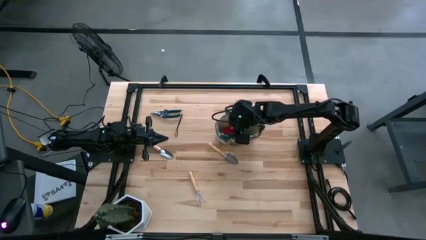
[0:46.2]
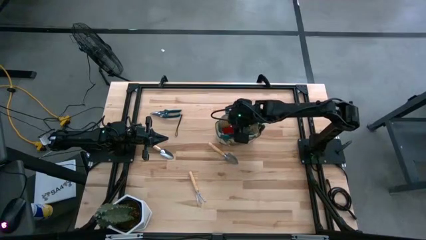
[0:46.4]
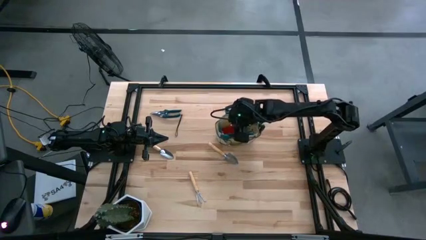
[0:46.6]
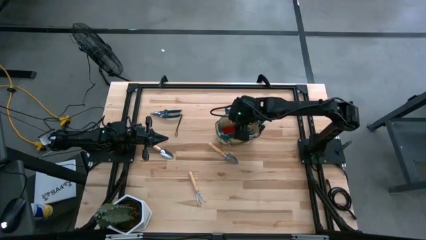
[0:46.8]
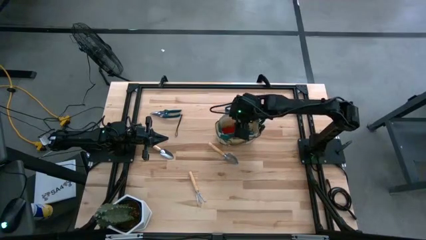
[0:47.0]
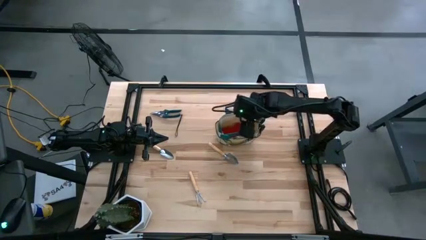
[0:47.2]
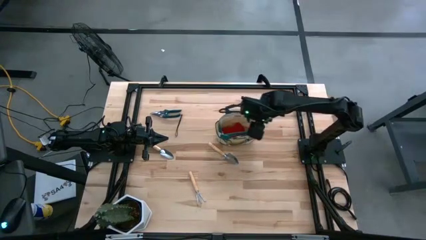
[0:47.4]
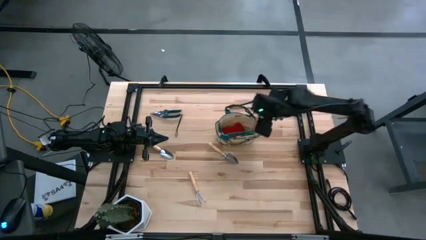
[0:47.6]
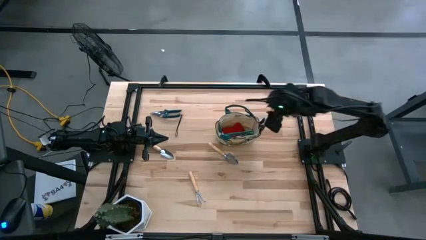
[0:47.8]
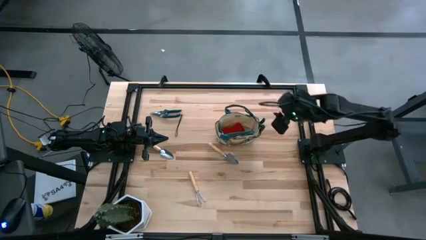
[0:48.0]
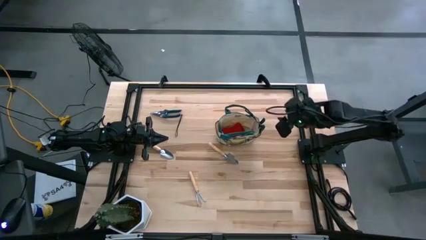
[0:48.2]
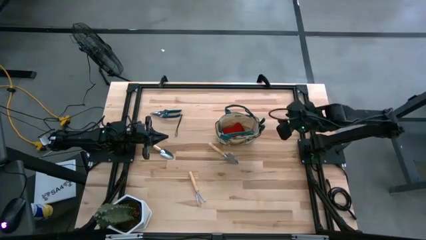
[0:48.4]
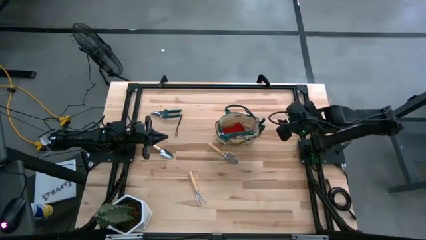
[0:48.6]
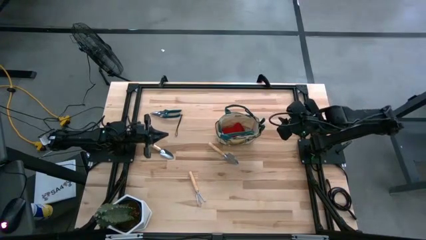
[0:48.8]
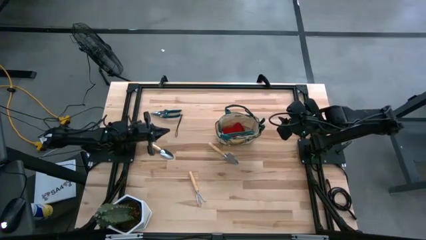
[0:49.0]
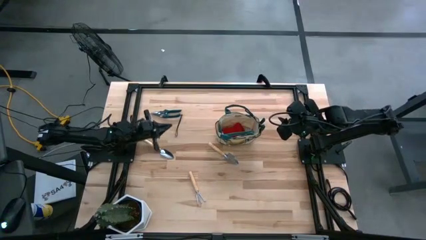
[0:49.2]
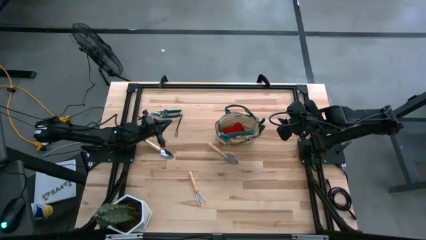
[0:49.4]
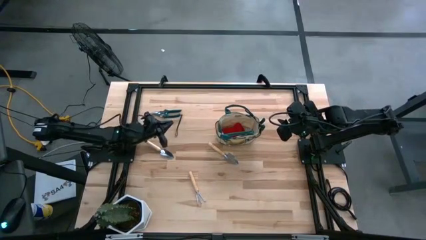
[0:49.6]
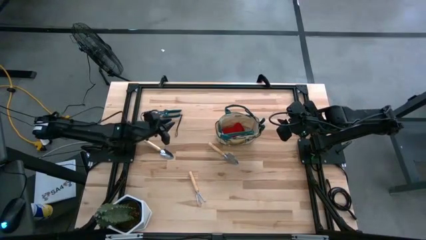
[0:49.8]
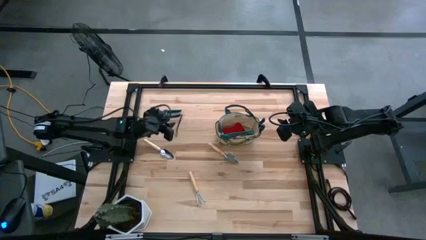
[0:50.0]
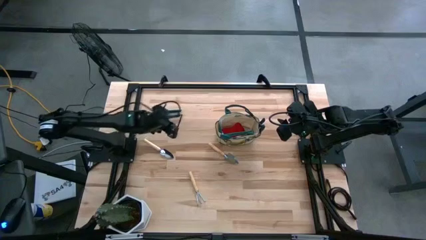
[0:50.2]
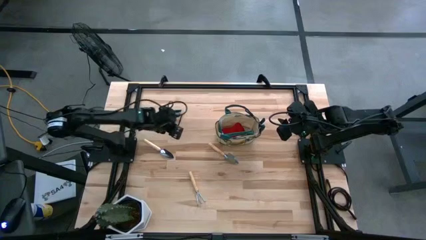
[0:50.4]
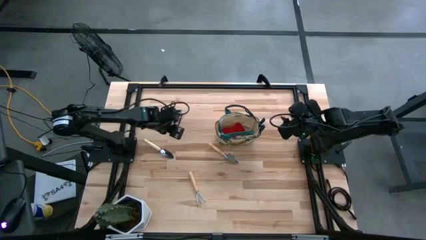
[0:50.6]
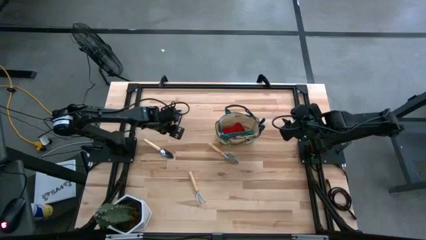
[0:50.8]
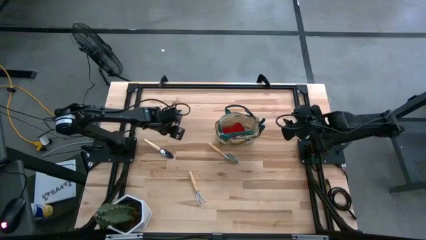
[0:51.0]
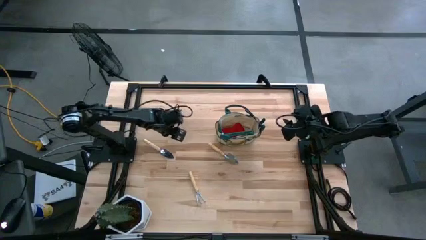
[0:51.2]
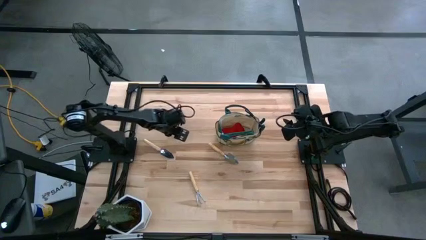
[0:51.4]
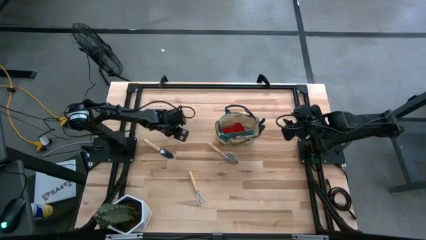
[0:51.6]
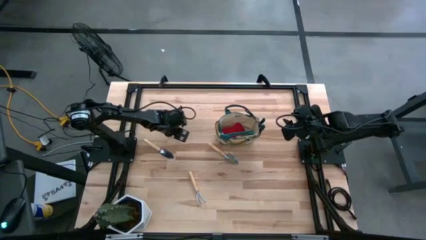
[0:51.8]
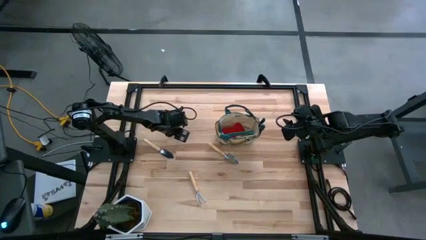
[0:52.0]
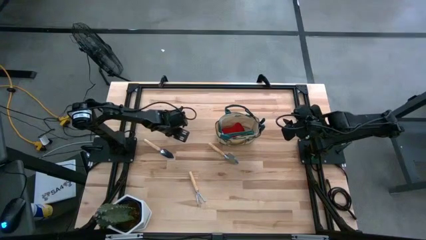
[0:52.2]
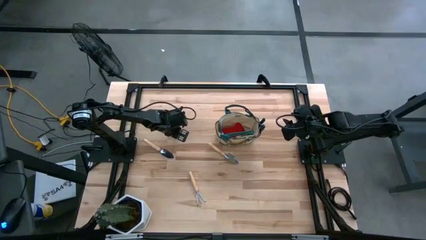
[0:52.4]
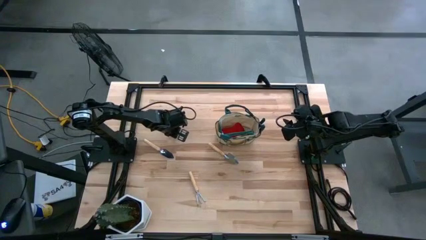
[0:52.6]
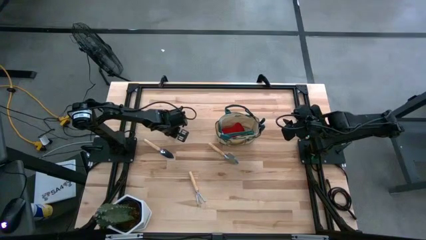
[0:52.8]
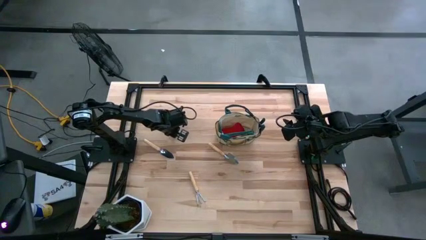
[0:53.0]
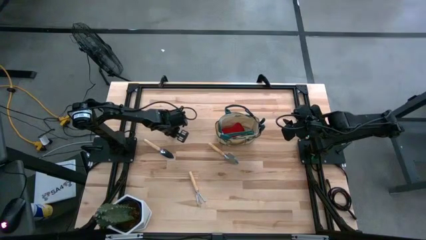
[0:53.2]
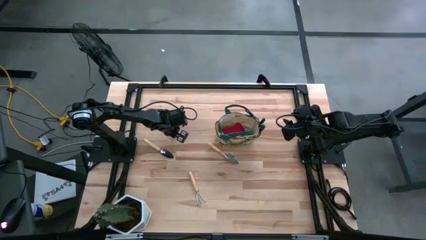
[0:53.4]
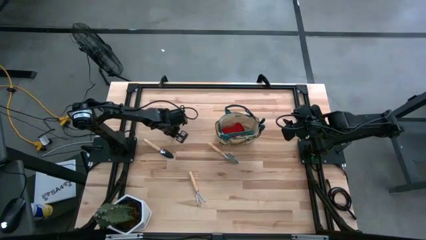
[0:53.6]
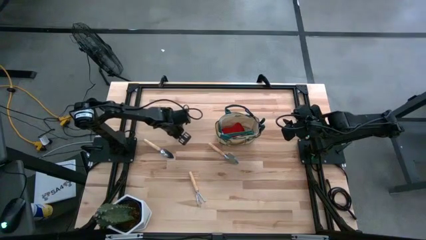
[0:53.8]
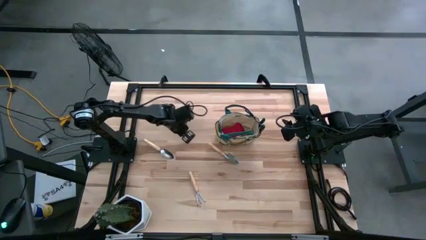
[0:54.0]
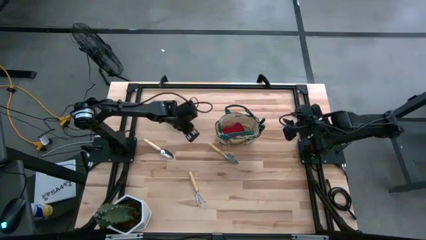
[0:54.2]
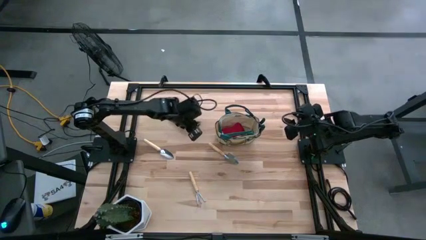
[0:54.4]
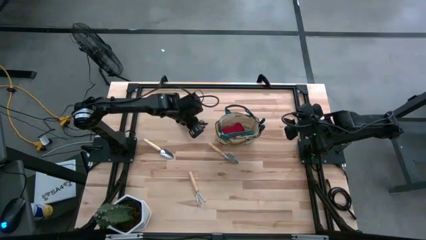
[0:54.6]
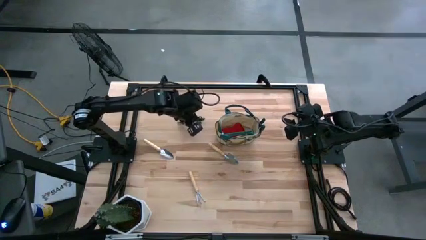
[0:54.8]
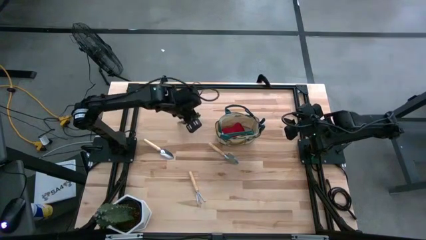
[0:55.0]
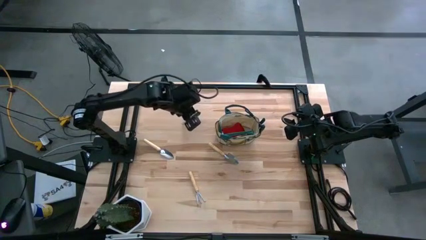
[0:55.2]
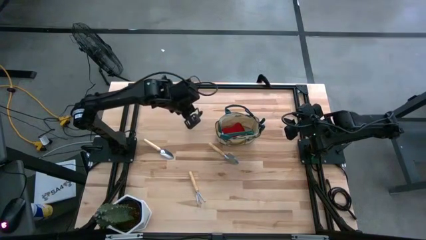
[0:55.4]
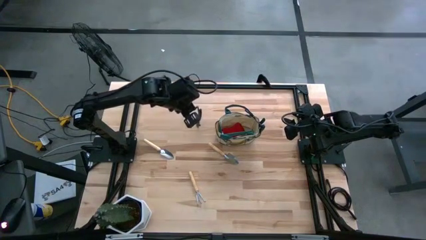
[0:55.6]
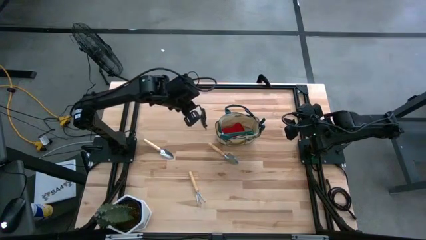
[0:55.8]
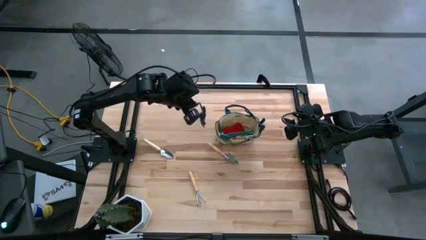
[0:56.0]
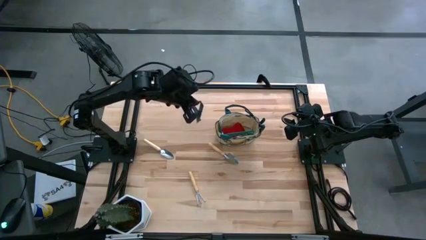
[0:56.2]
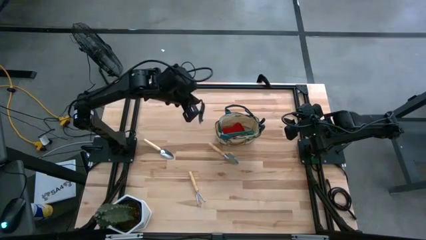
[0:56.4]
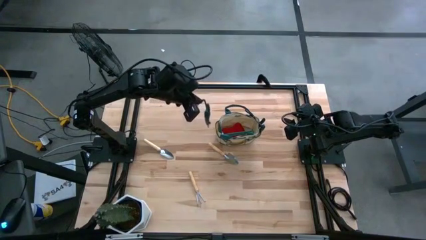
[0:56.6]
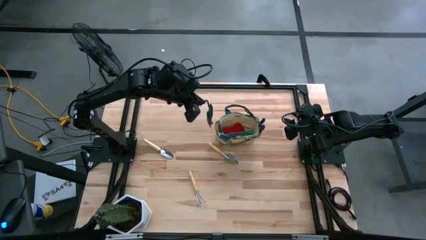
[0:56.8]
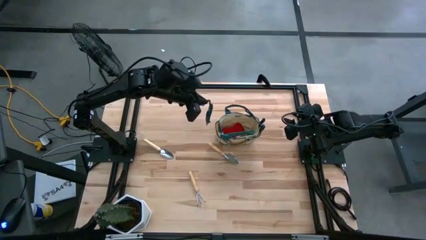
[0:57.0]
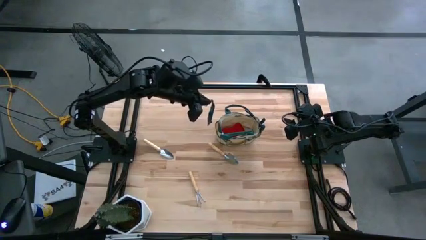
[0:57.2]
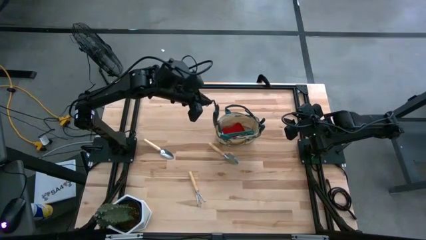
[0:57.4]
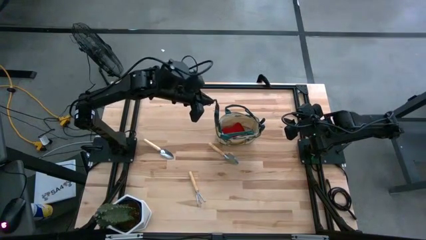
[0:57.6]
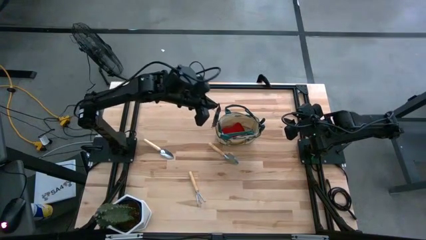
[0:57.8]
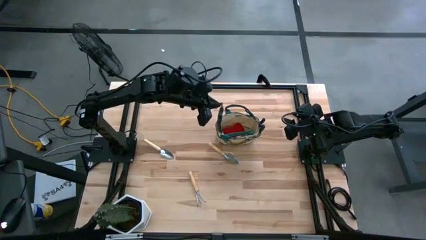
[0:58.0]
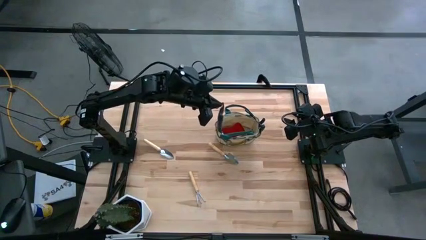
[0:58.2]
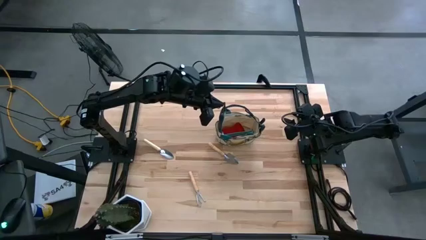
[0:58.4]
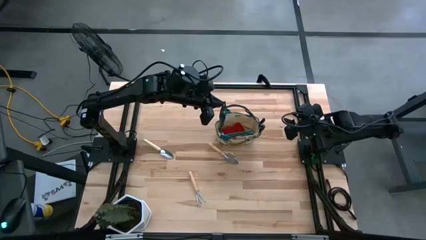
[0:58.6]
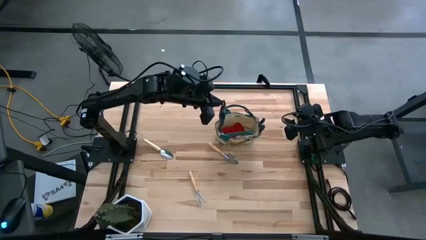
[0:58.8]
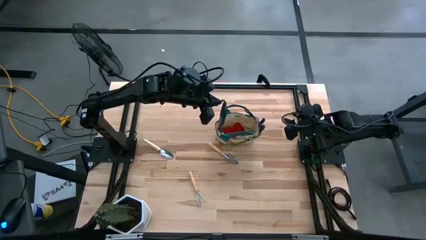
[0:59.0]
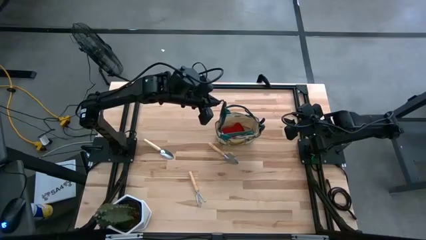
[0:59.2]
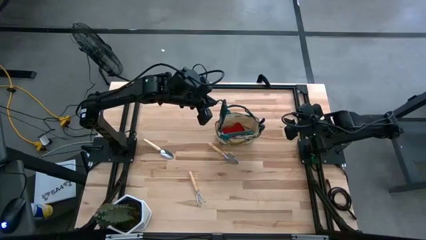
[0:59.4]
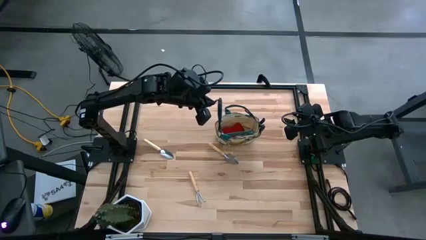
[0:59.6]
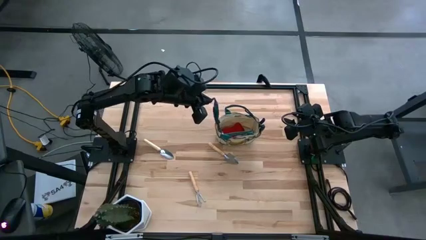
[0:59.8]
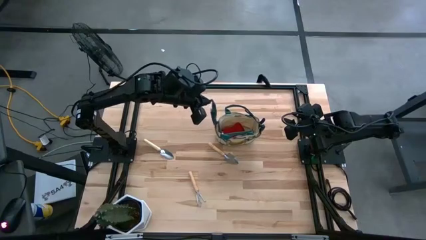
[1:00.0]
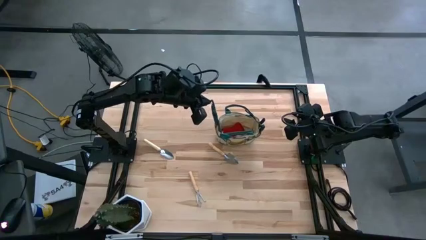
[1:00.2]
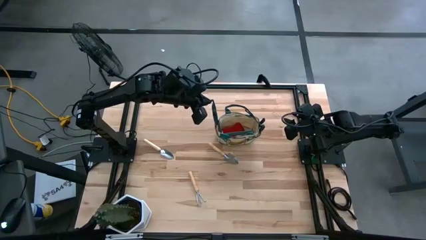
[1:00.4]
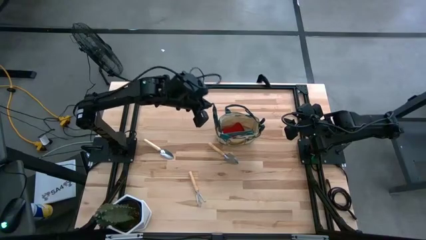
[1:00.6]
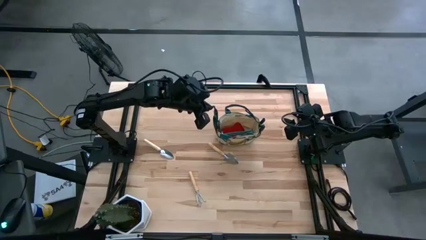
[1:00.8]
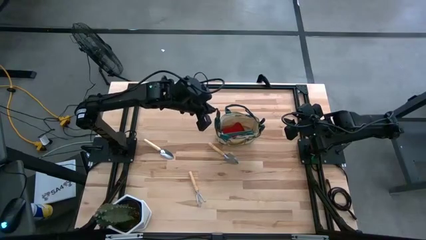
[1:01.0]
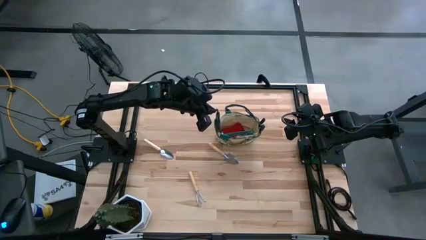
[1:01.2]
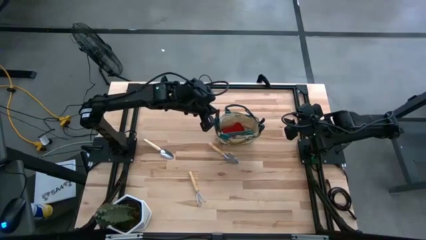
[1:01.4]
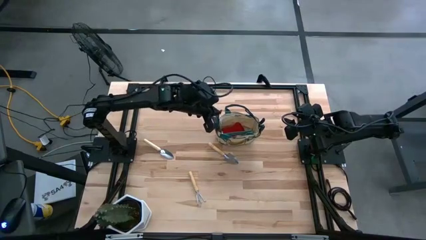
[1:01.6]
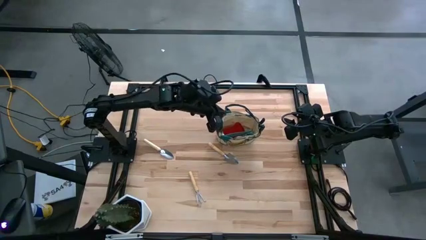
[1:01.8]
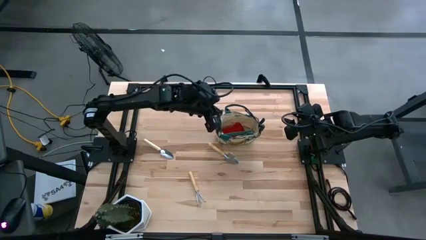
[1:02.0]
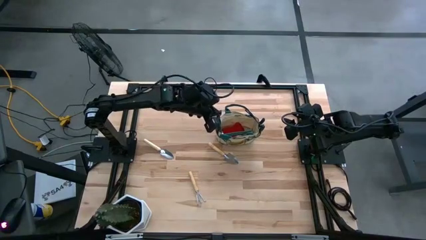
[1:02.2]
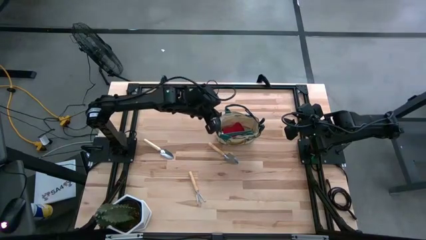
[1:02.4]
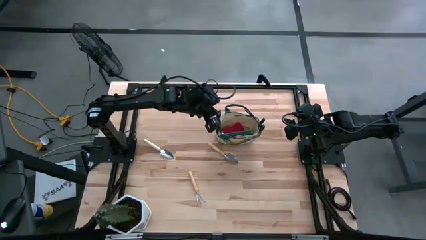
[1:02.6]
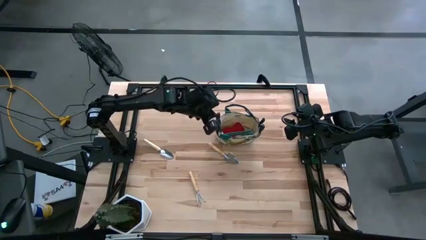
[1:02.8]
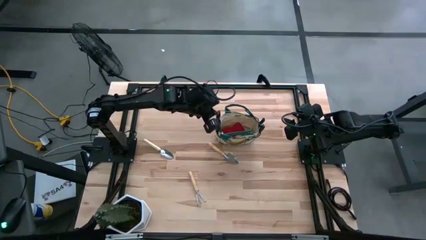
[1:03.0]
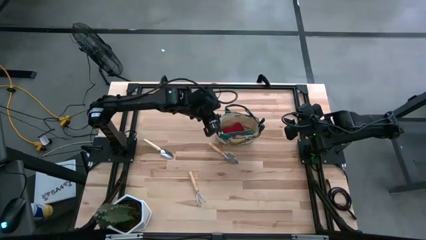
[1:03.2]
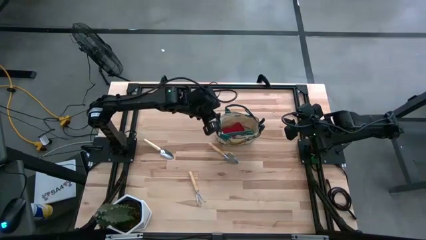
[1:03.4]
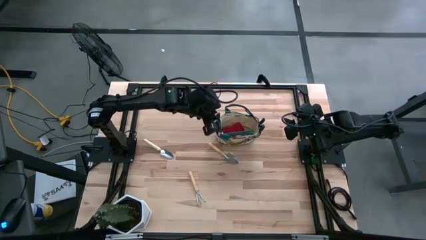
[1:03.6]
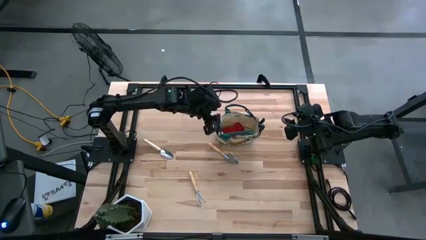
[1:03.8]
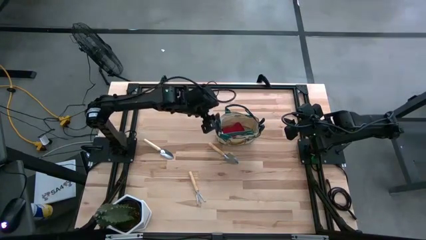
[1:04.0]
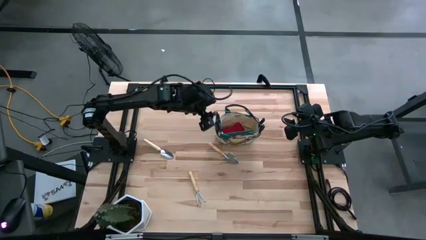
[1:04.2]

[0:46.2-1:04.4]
Task: Pick & Place Garden tools in Gardening bag
Put the green shear scissors into the gardening bag
